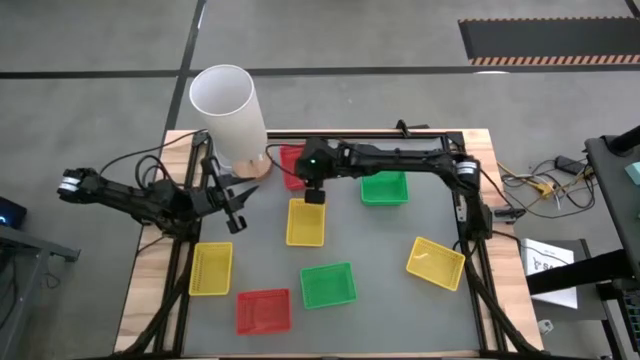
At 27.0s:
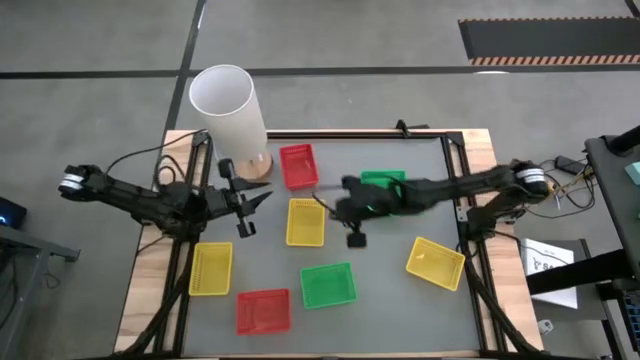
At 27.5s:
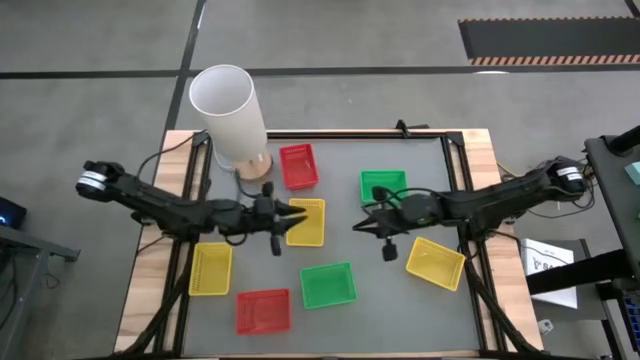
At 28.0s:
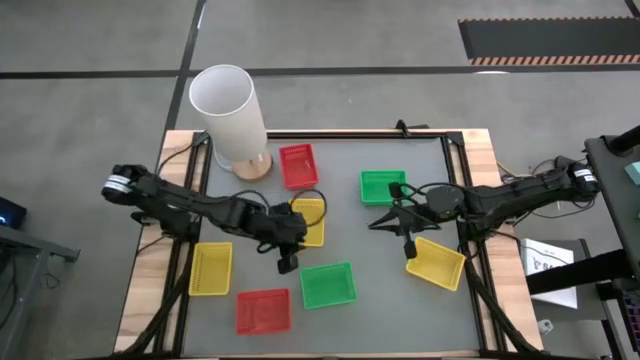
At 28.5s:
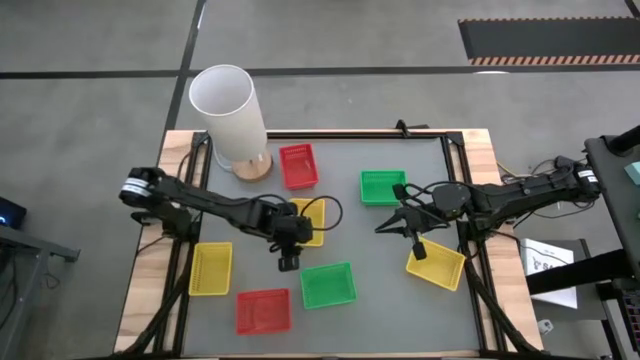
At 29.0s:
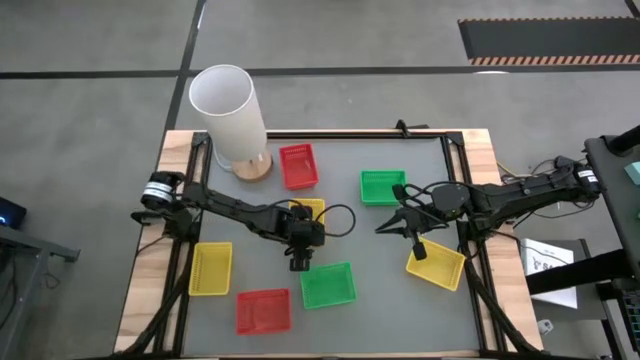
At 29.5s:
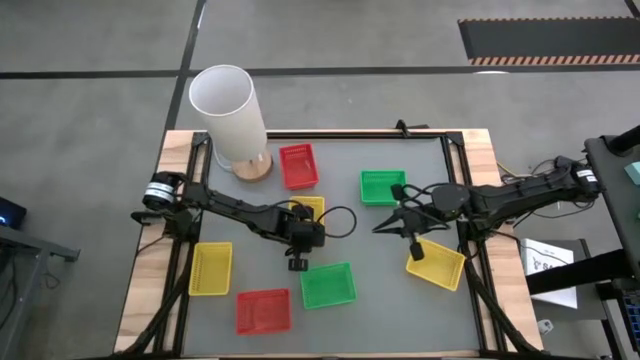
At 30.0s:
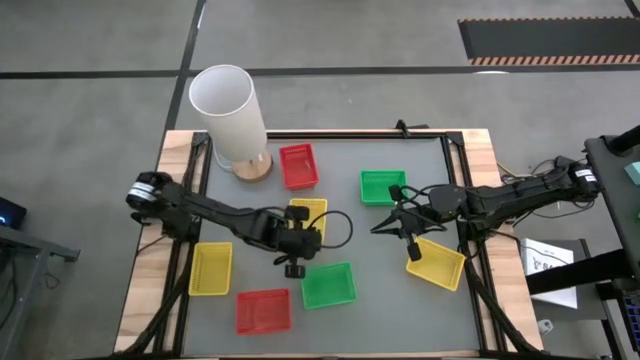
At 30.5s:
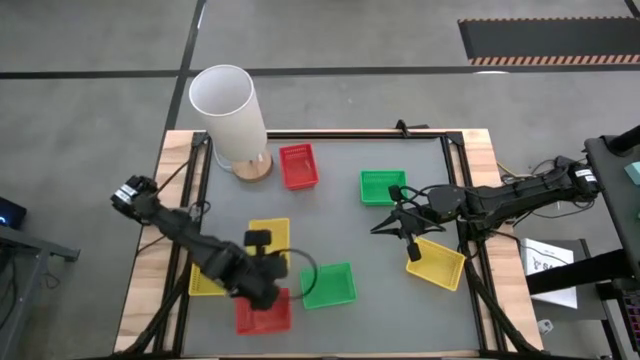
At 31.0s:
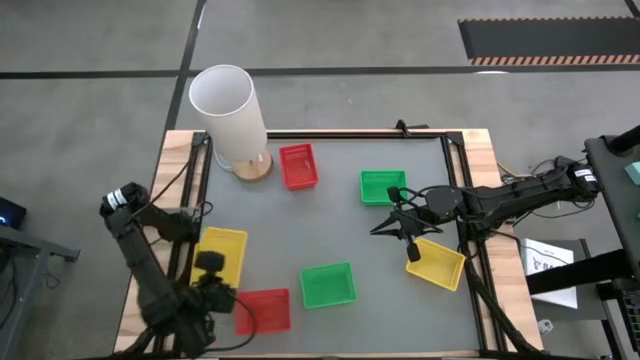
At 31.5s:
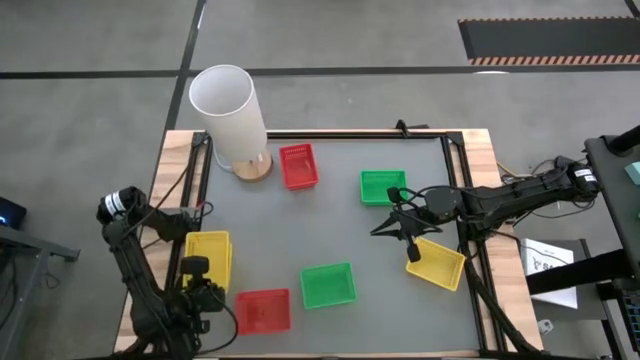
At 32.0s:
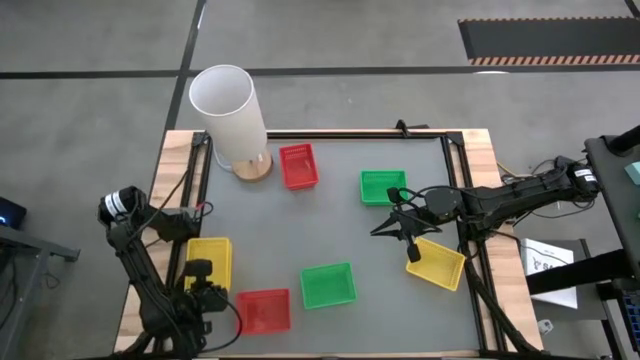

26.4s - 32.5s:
Stack the top yellow basket on the left yellow basket

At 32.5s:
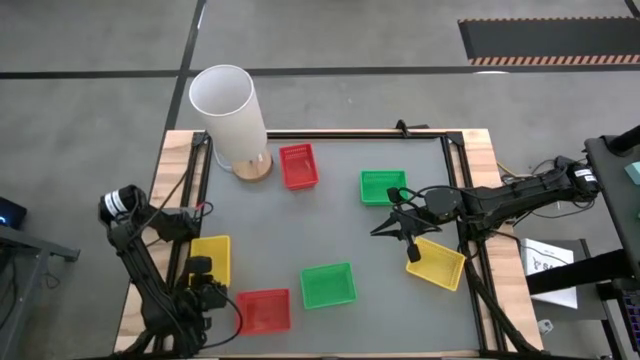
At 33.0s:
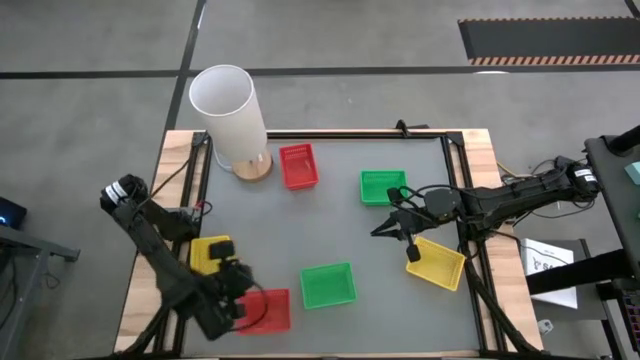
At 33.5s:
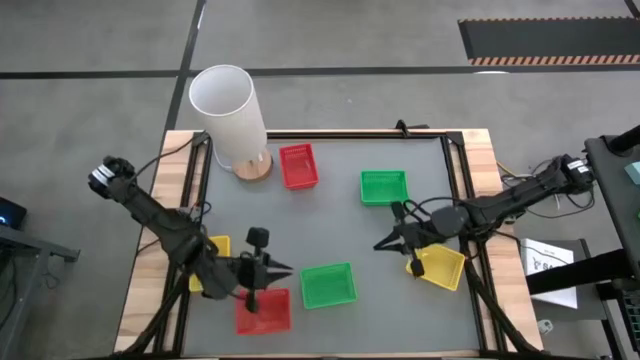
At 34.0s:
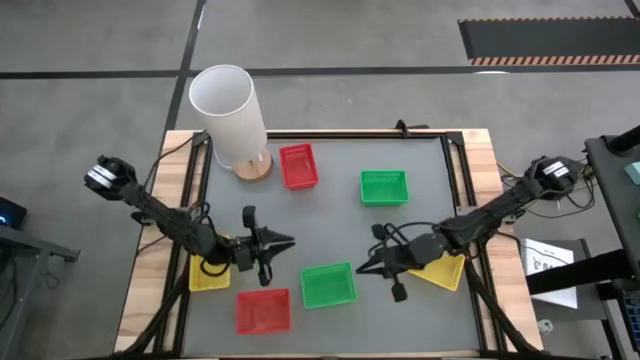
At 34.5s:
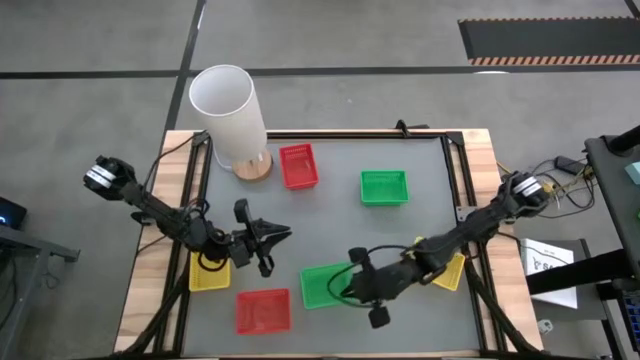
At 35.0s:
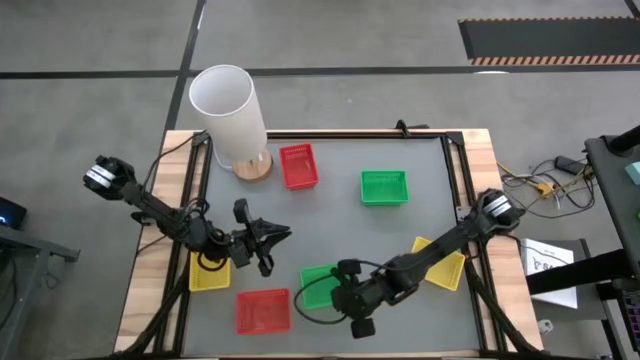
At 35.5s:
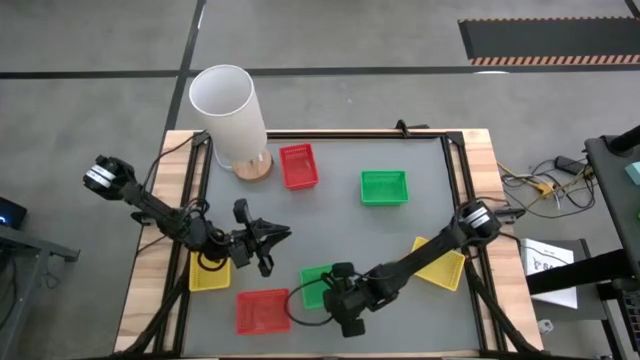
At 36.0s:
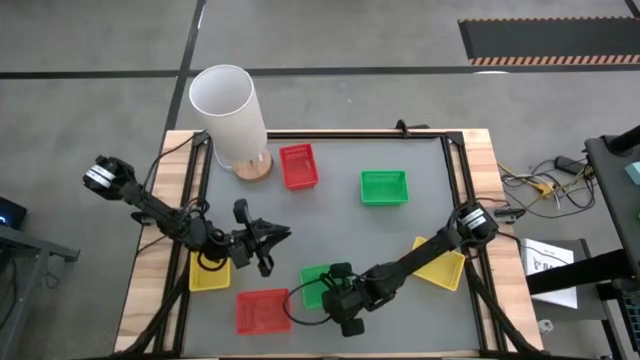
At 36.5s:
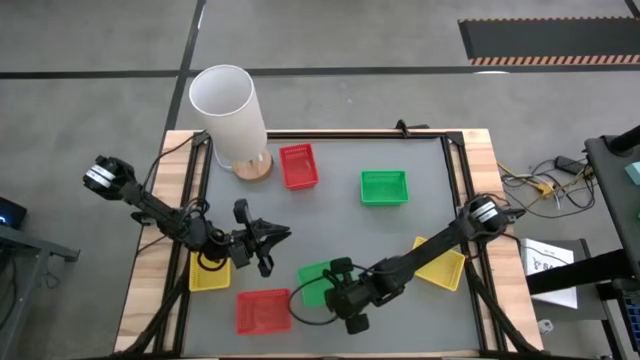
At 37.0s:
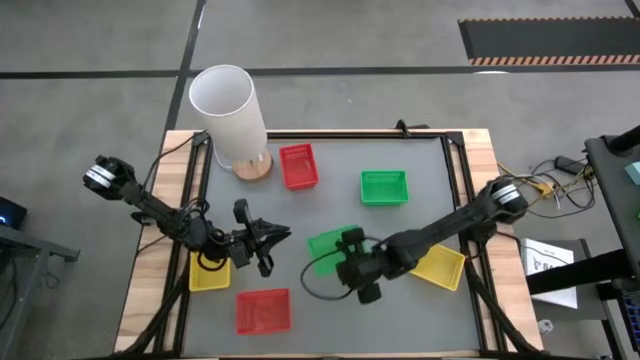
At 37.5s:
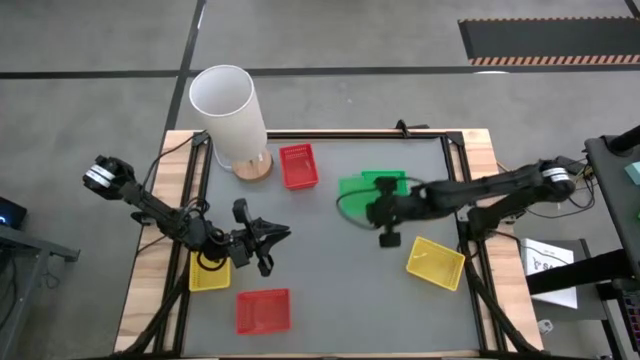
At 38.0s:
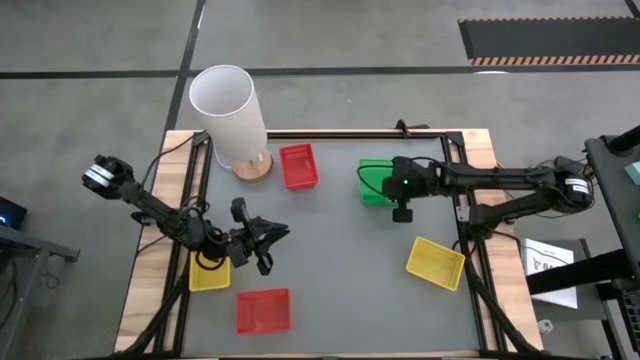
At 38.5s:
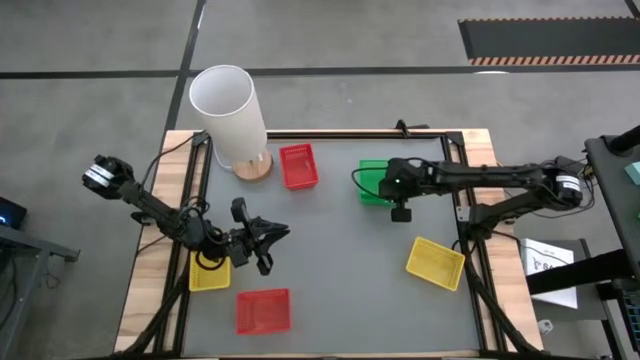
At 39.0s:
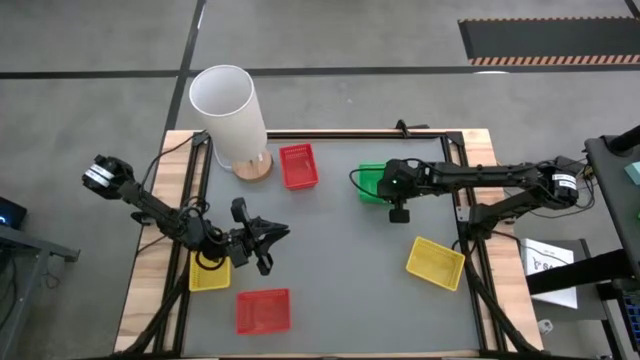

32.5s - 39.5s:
Stack the bottom green basket on the top green basket

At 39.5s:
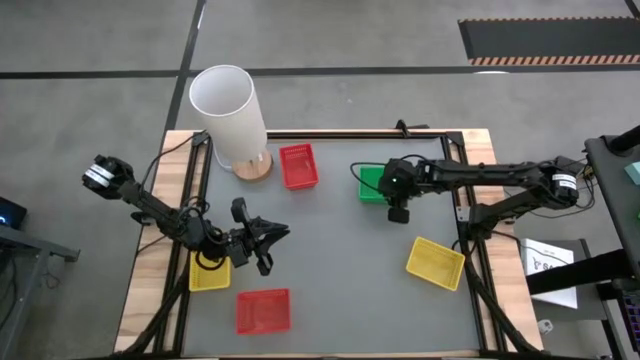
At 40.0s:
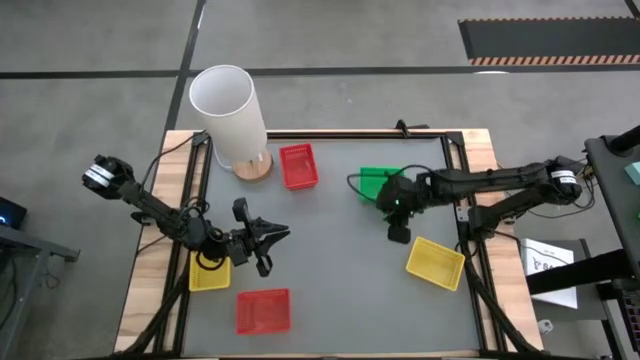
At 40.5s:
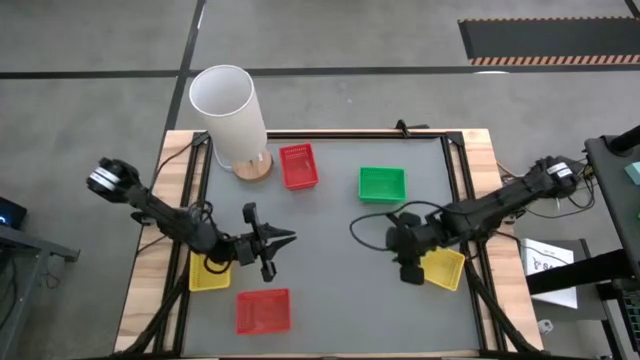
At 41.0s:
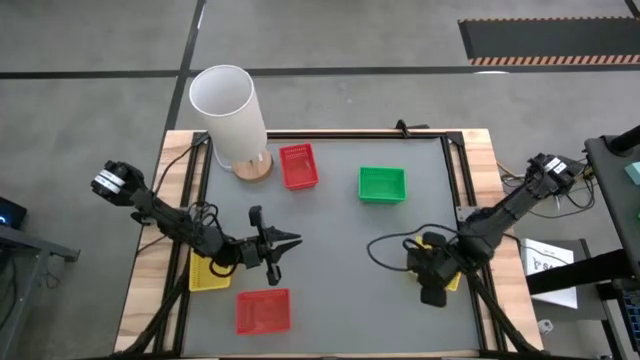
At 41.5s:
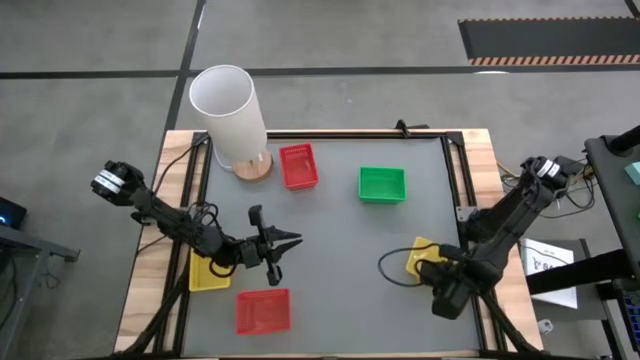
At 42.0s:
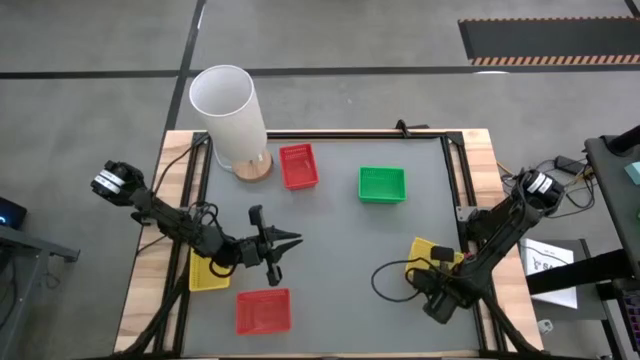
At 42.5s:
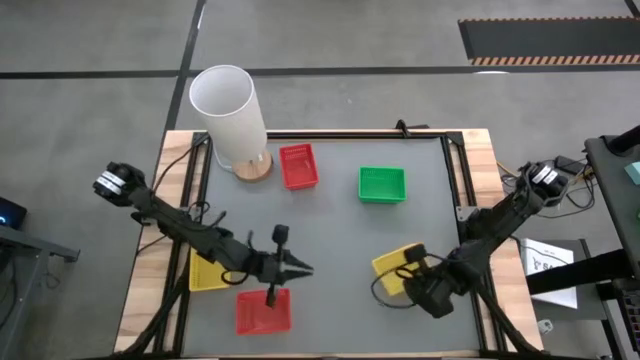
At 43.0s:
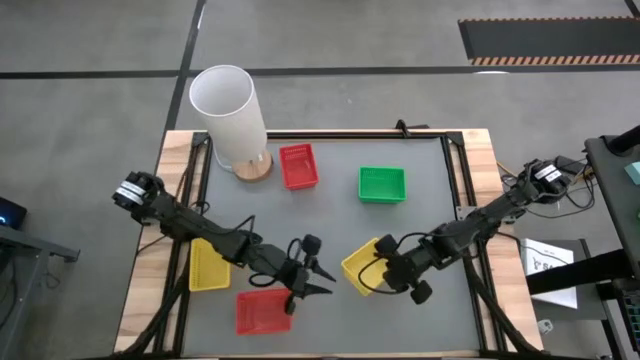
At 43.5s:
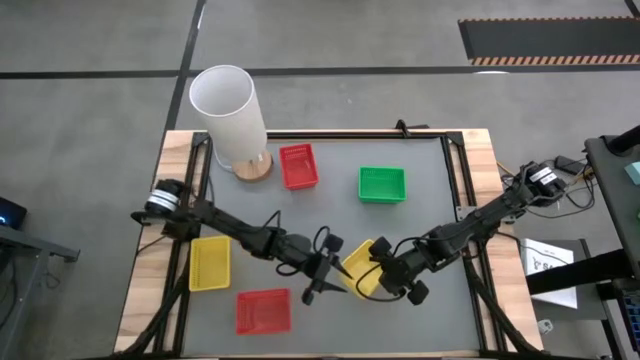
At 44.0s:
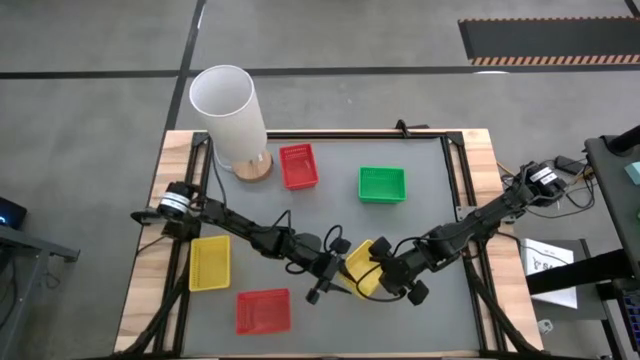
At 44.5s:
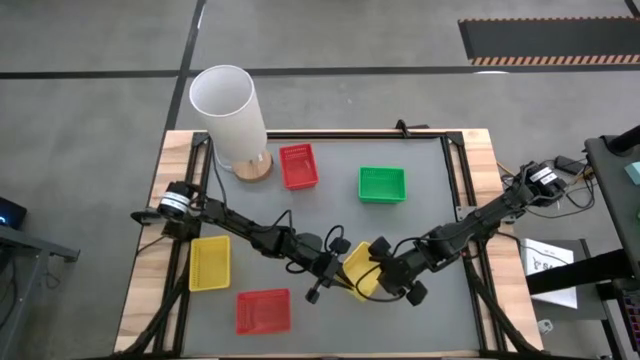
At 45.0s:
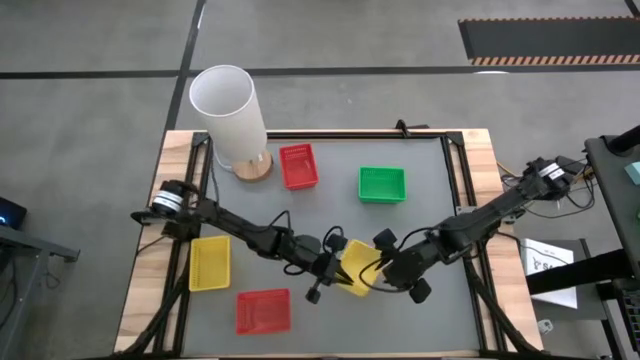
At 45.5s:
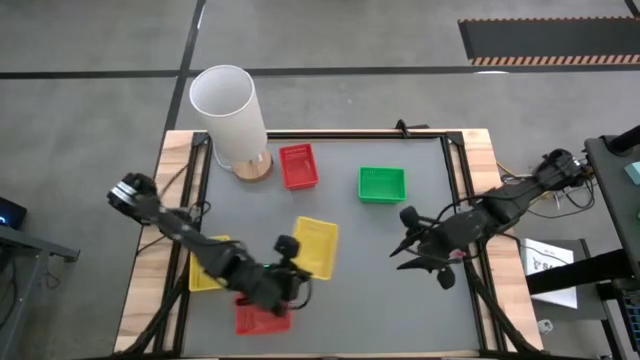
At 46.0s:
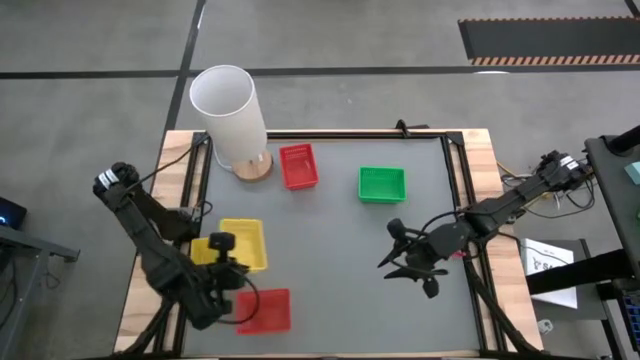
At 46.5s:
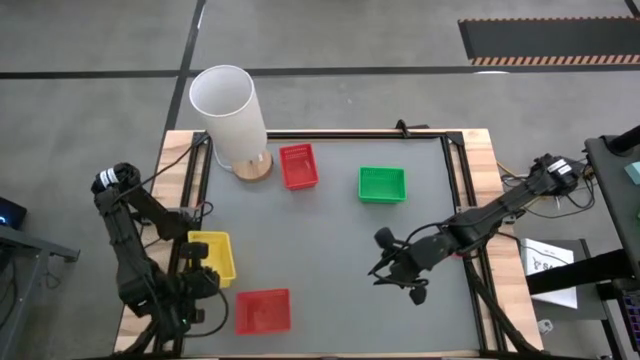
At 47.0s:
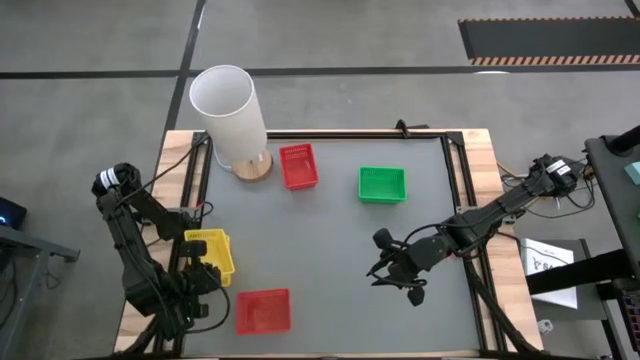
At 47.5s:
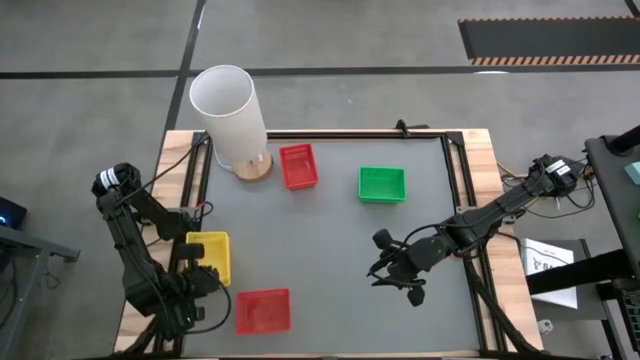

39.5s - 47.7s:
Stack the right yellow basket on the left yellow basket
